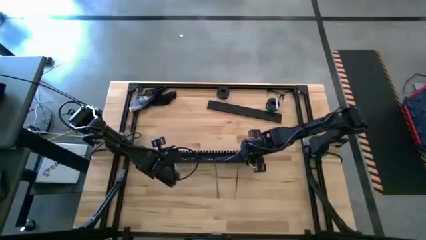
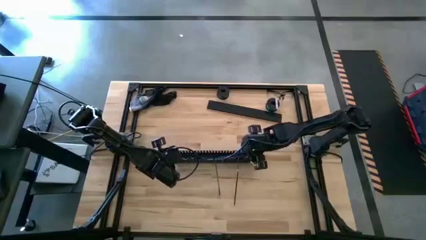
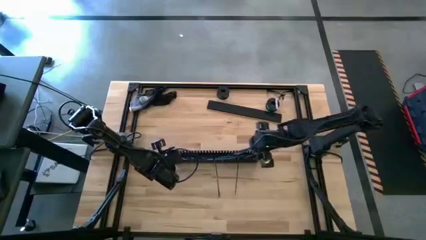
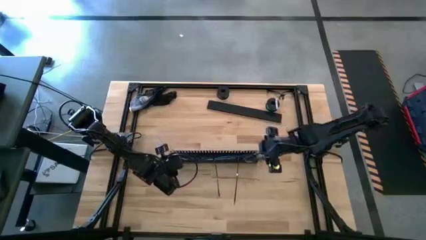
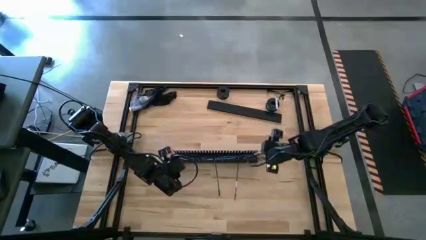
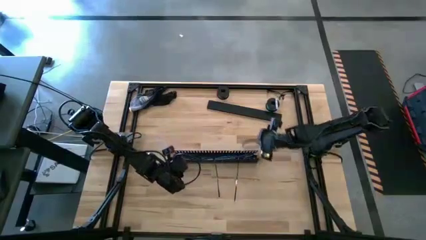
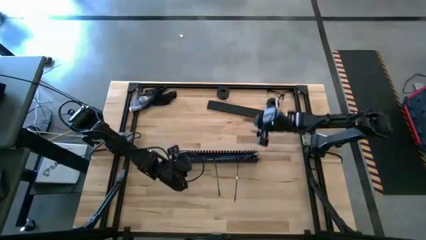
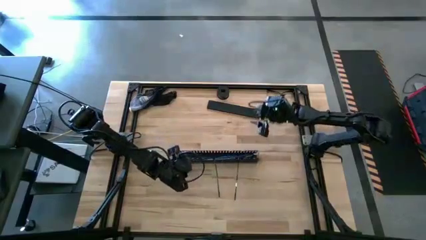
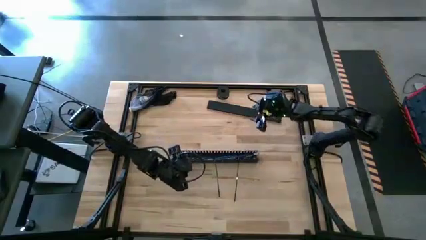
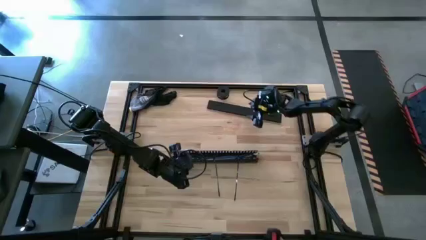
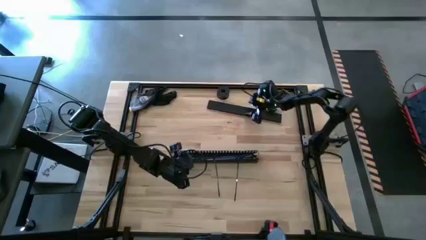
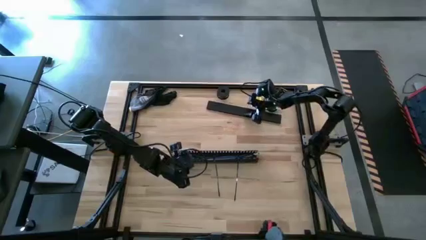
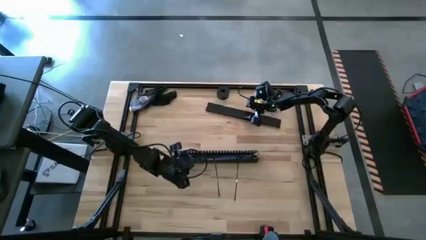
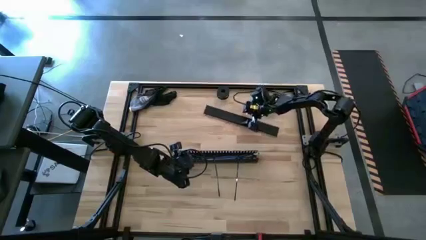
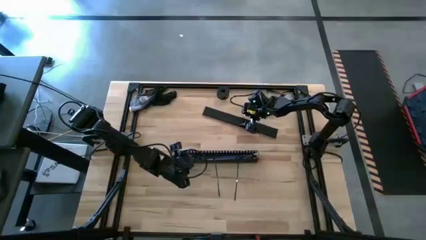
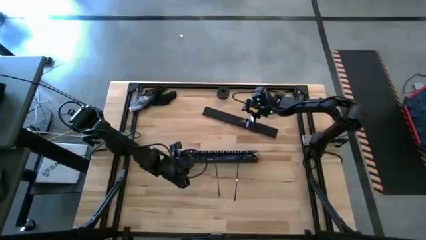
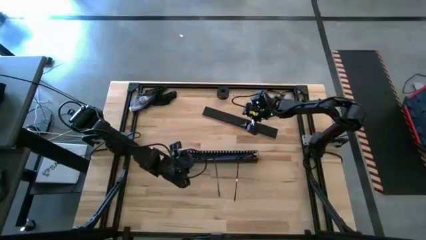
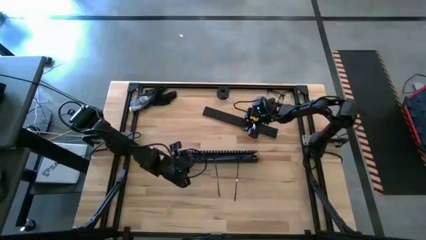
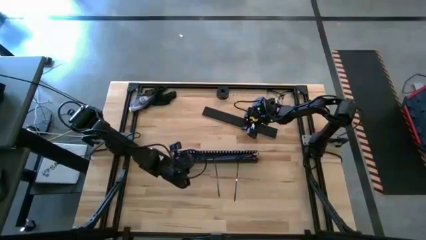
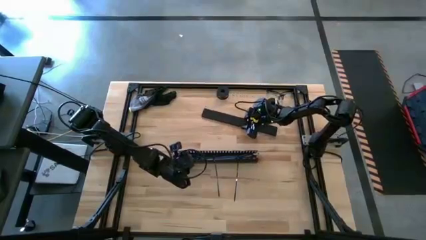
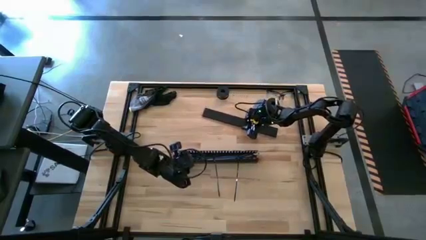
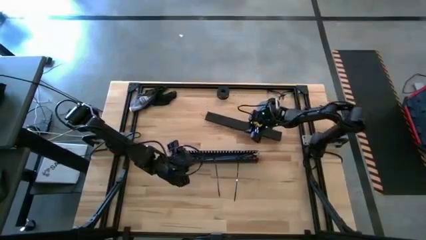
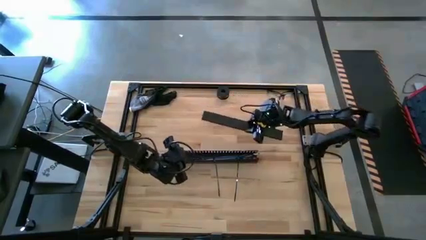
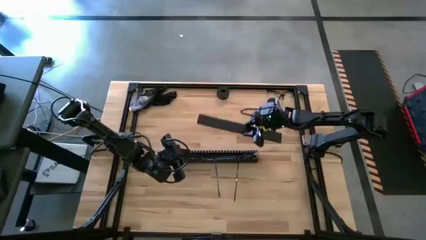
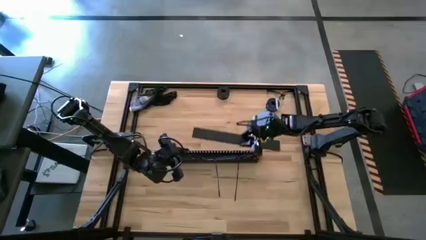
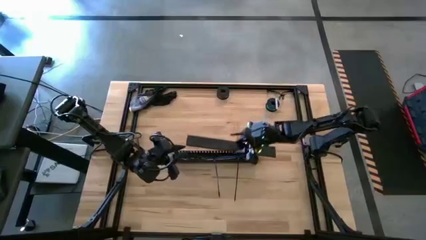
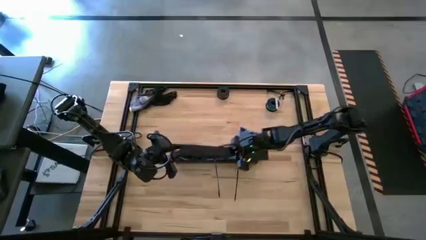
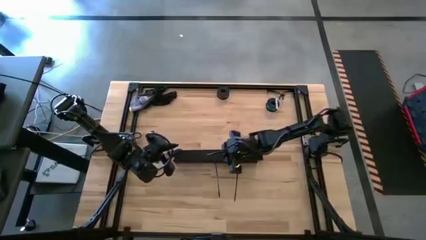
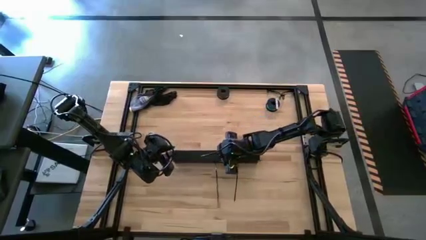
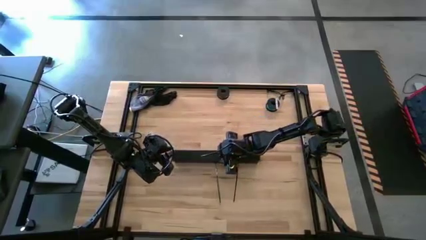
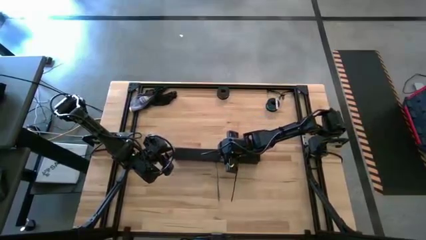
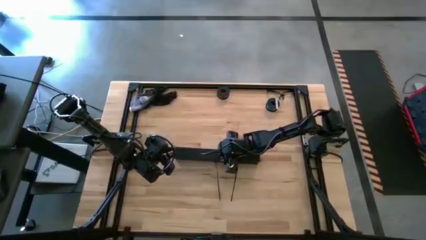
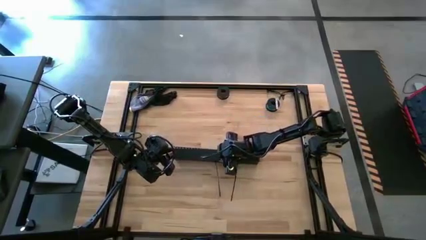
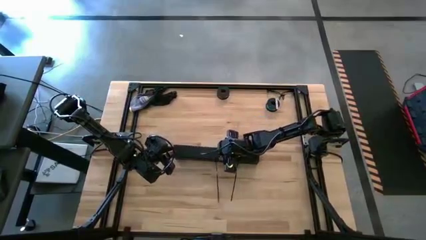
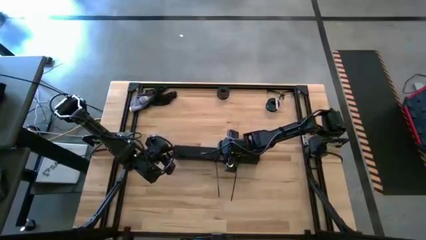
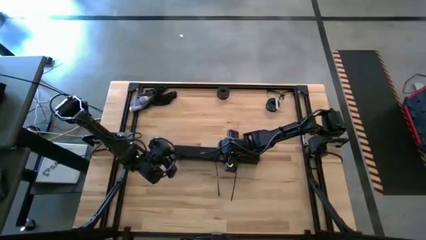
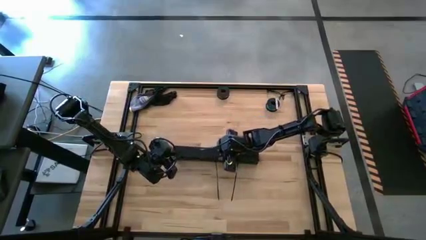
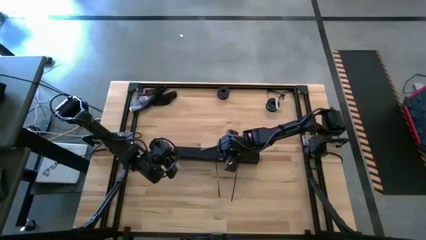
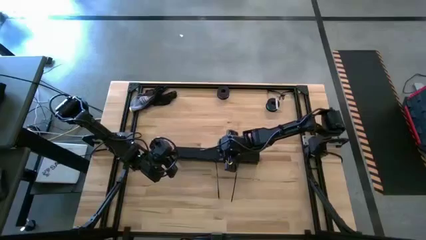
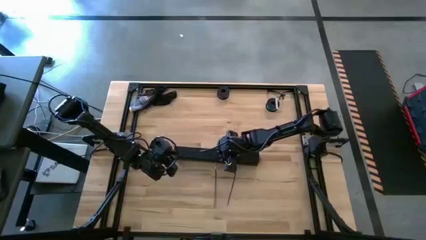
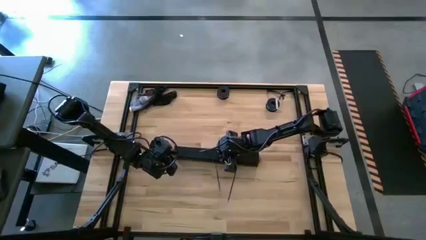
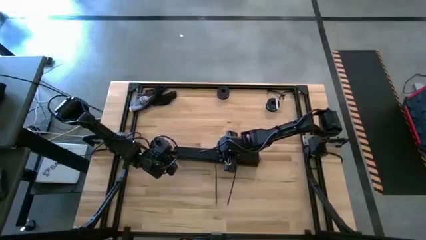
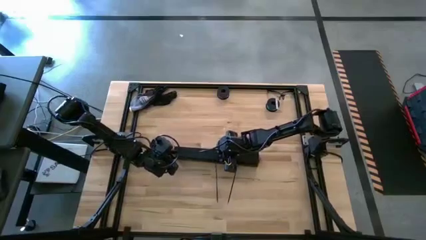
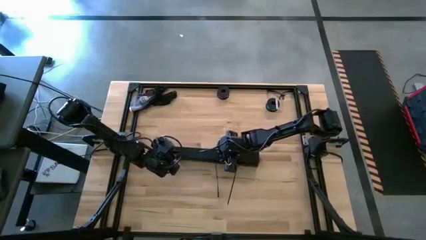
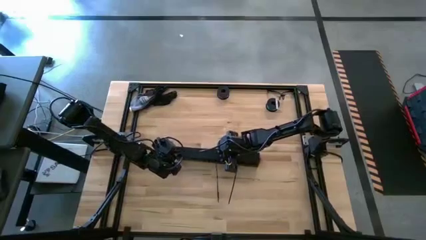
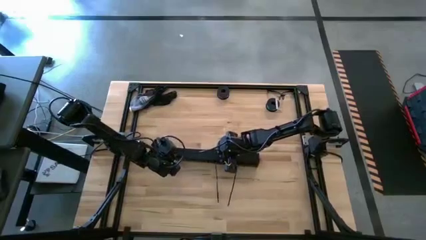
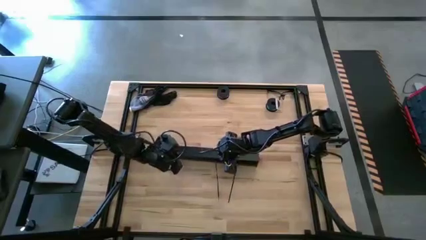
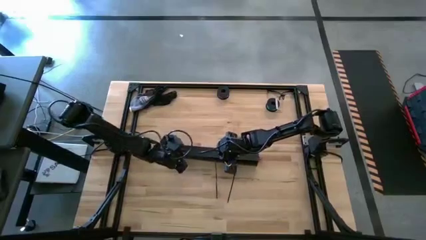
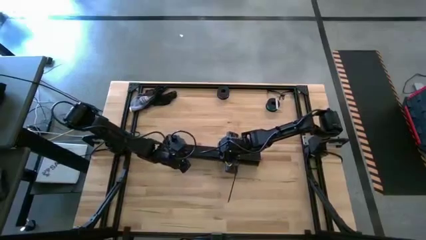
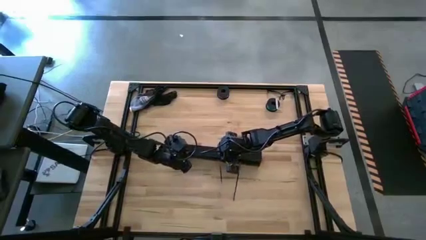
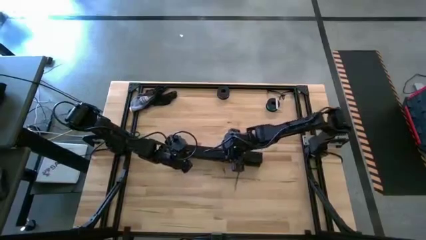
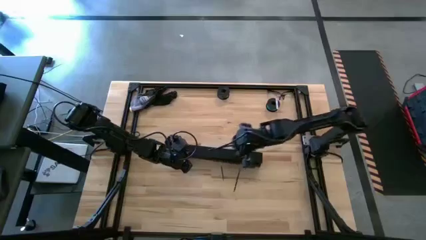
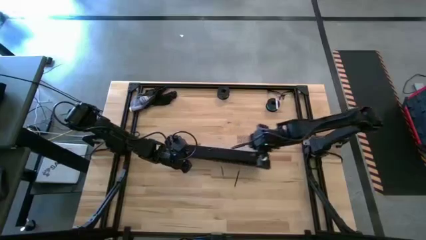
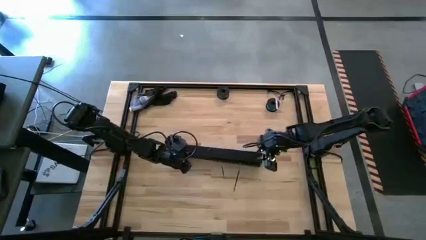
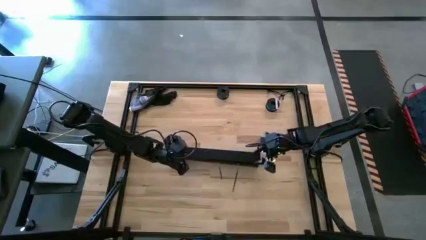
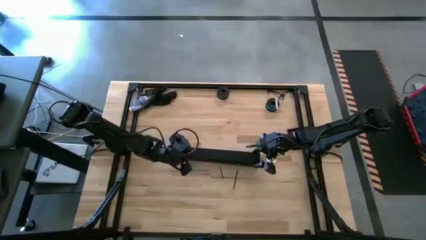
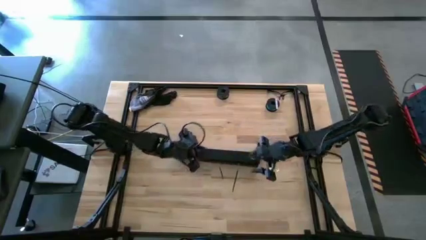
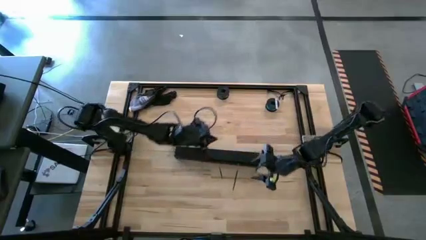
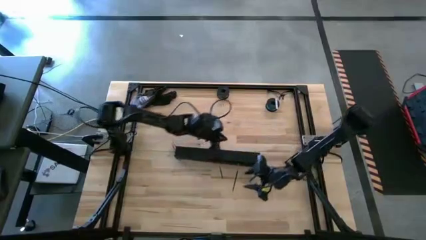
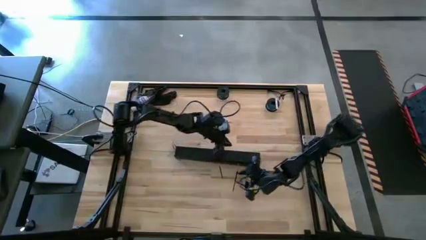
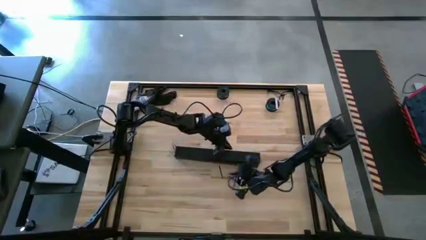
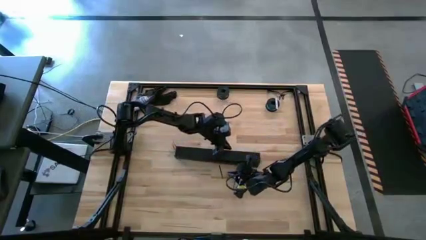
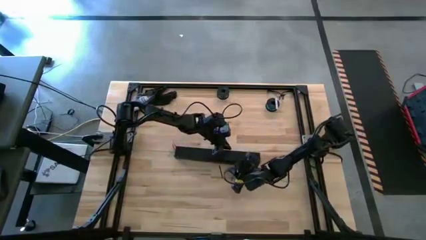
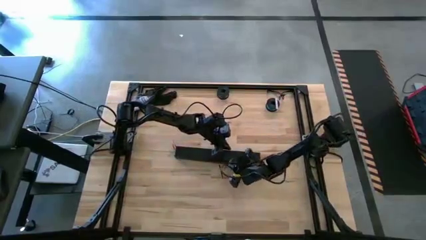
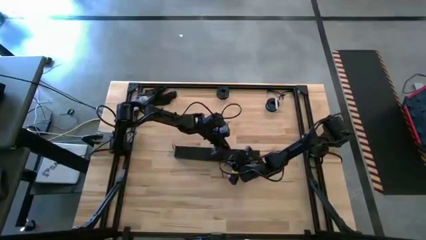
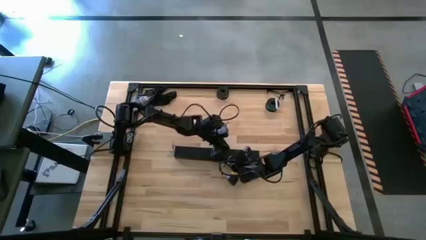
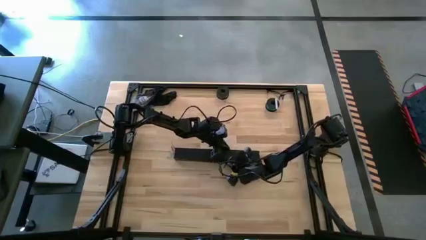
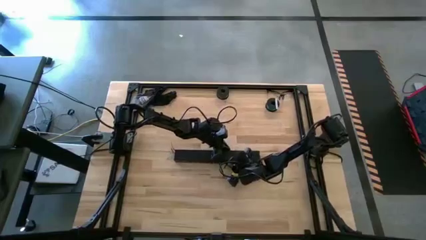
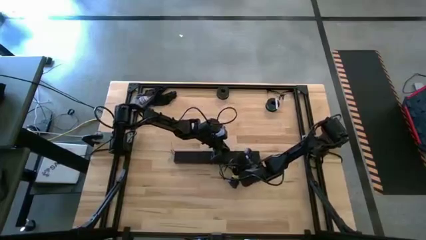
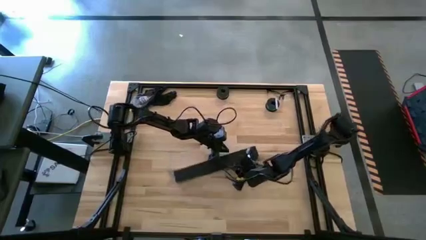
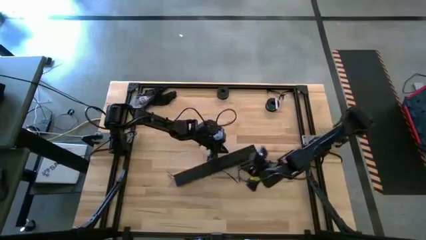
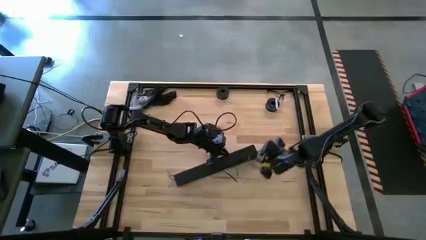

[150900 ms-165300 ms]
Task: Ziptie cables
Close the black cable duct
